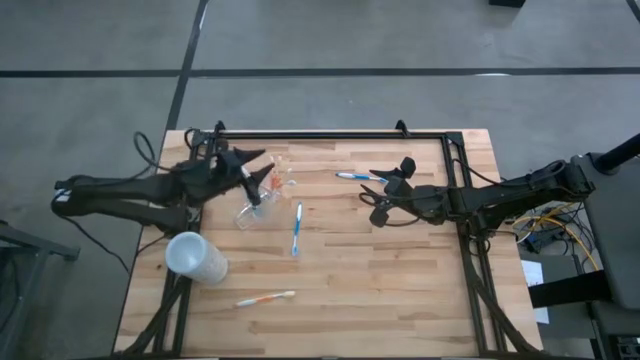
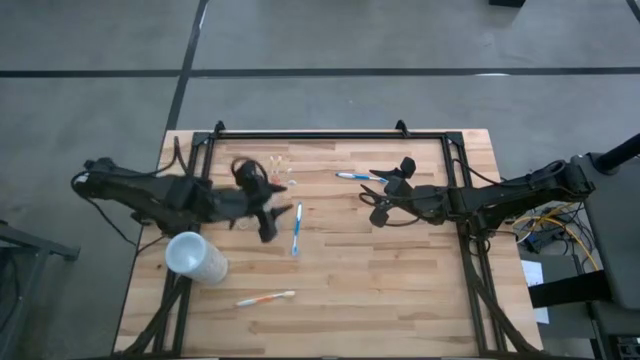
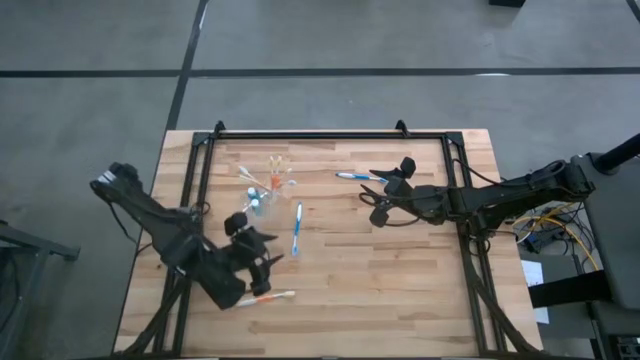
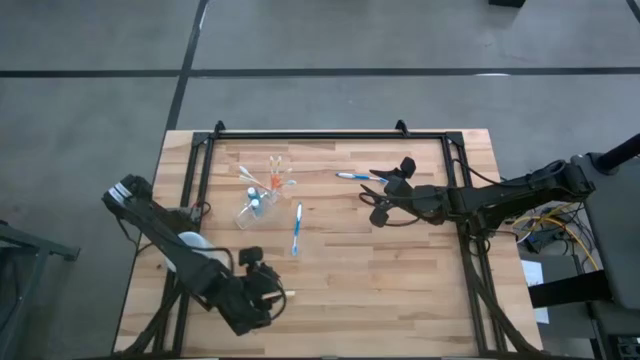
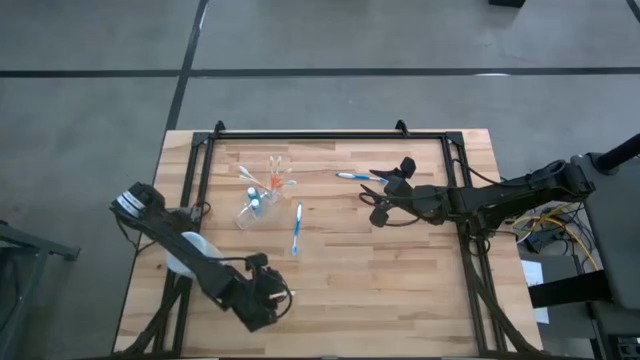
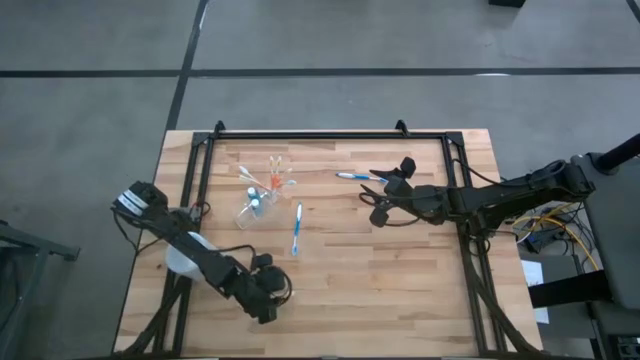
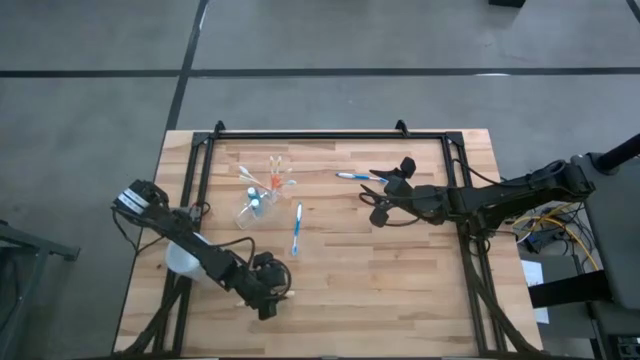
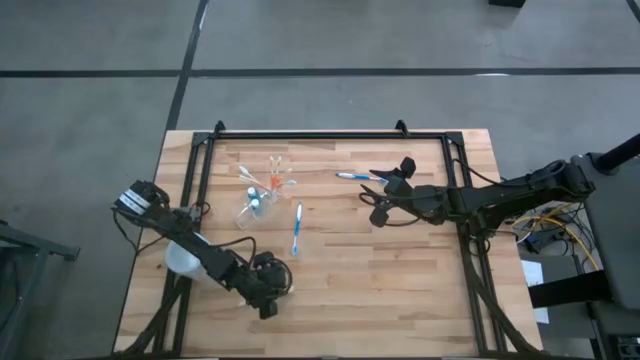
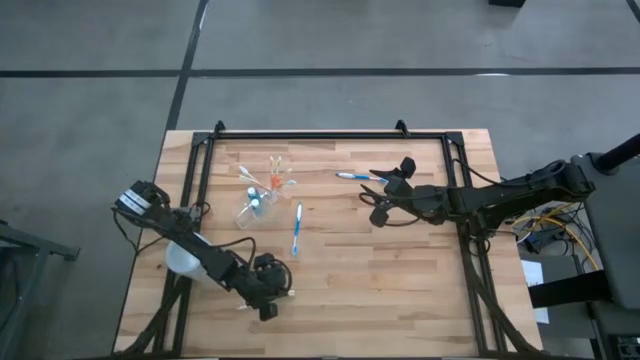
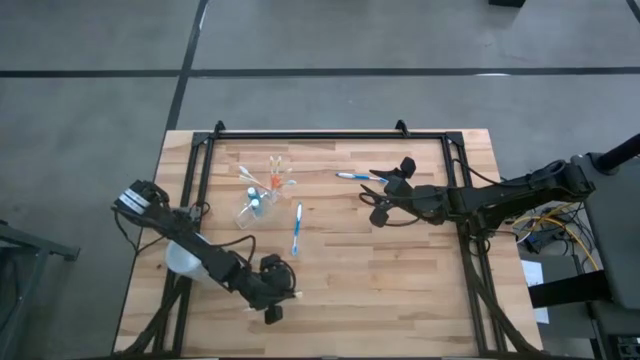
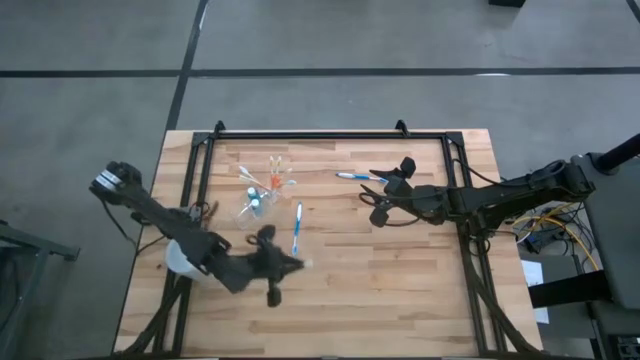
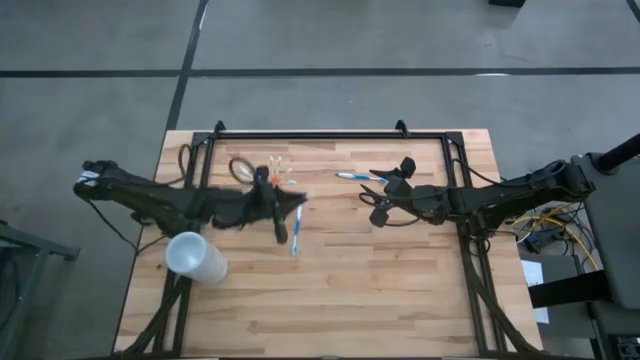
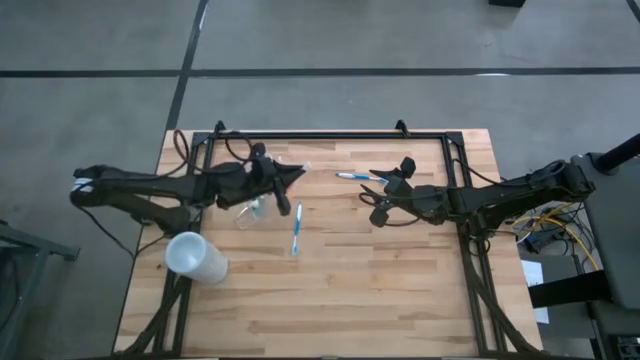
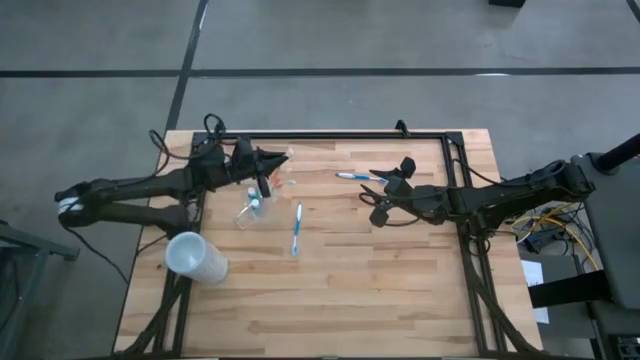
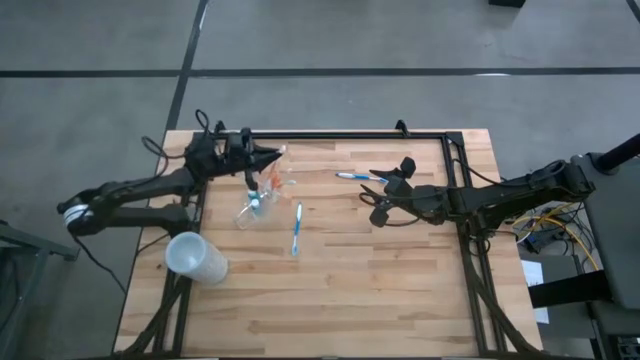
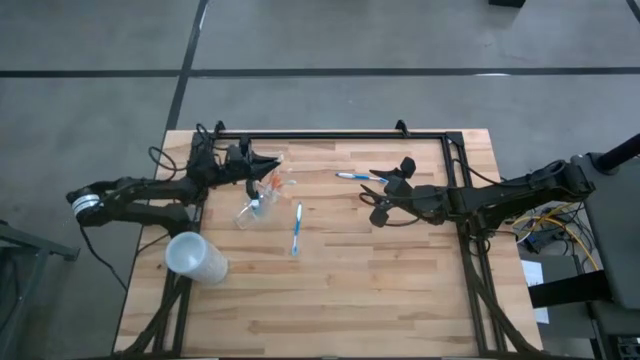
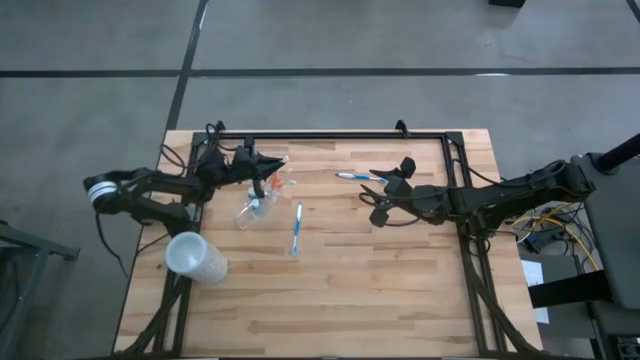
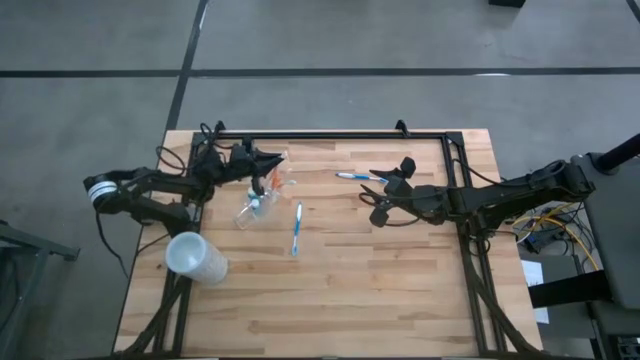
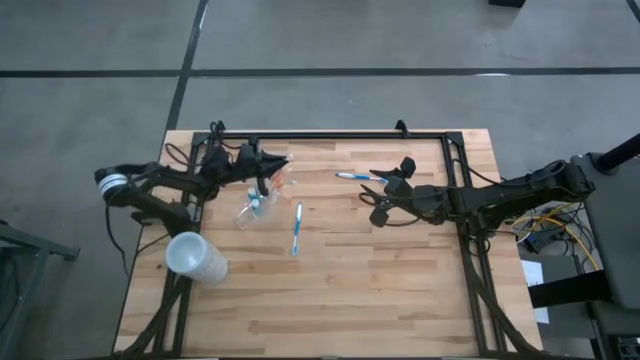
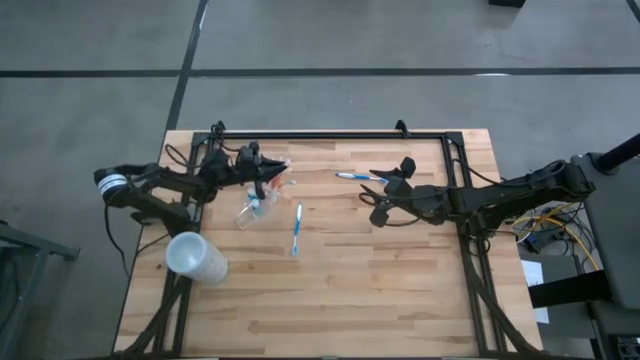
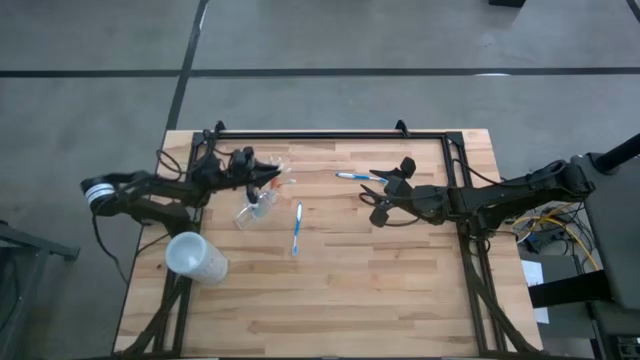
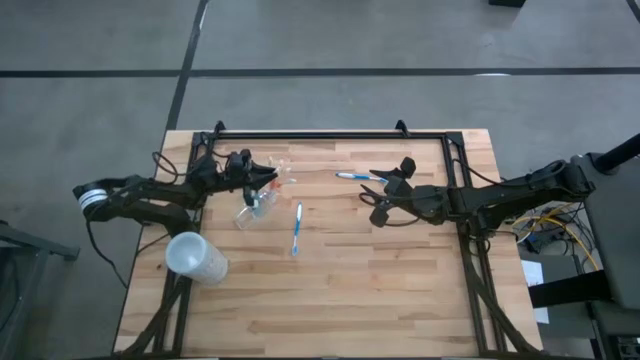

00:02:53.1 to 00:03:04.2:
Task: Pick & Place toothbrushing station
Put the orange toothbrush into the transparent organizer

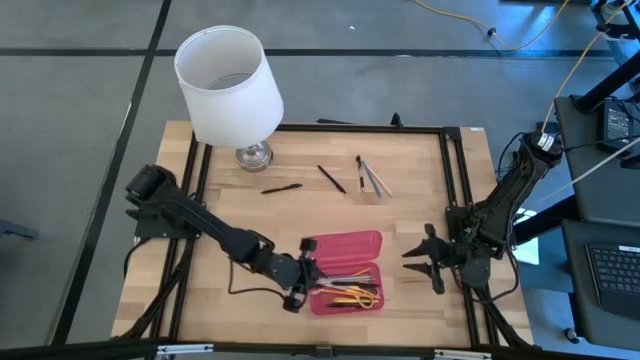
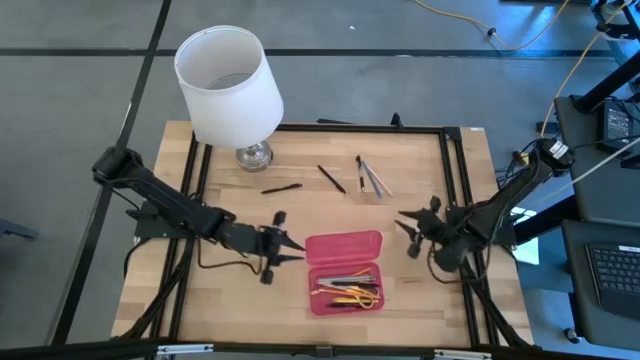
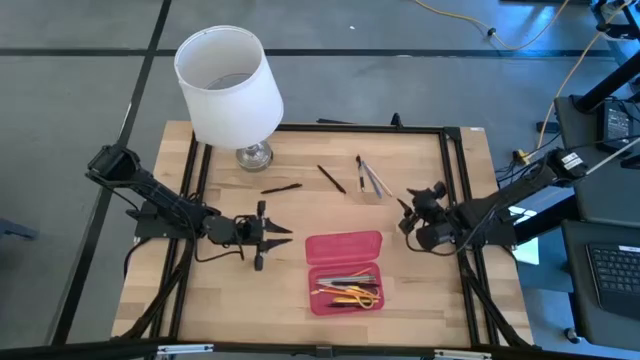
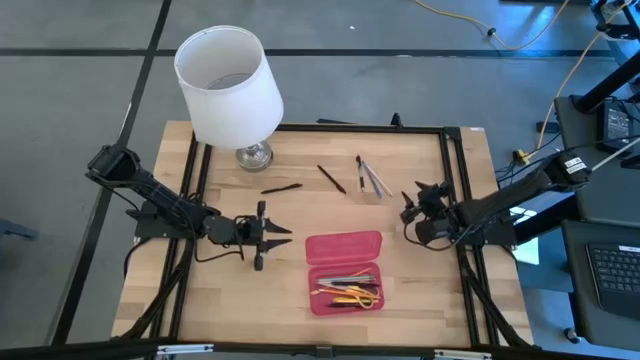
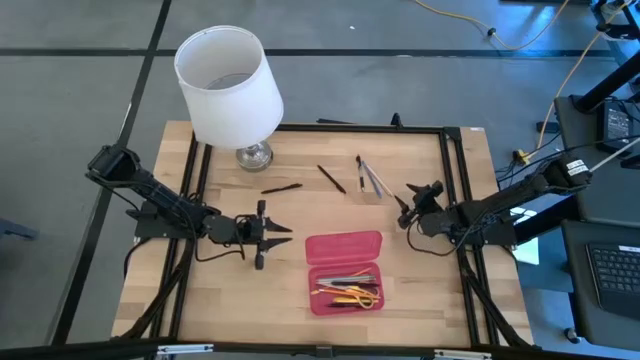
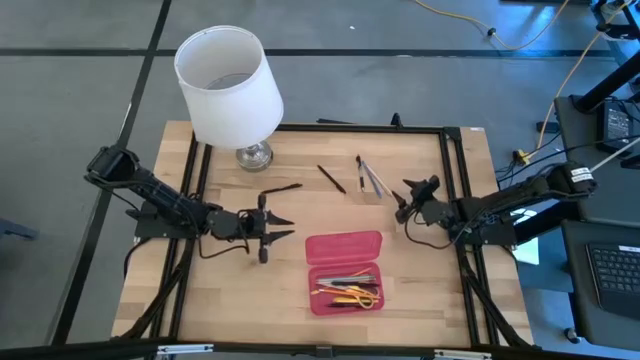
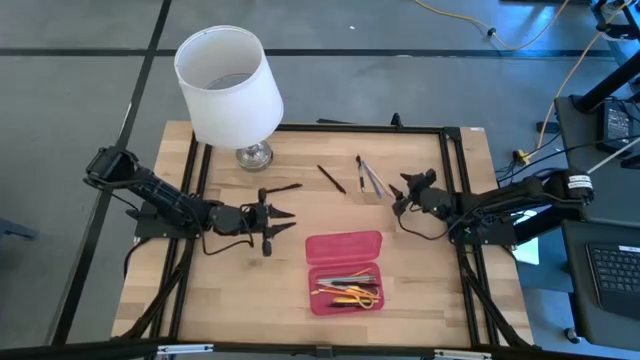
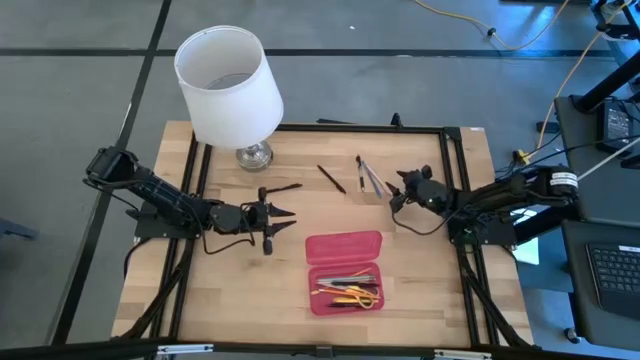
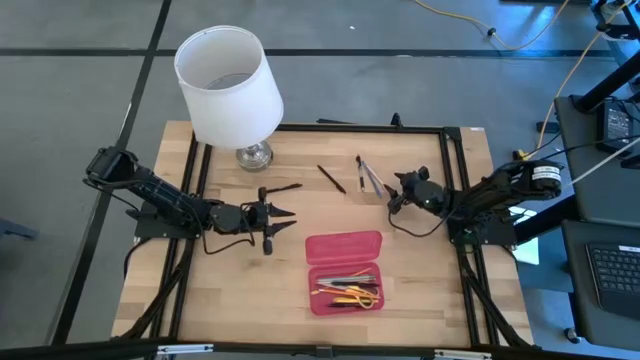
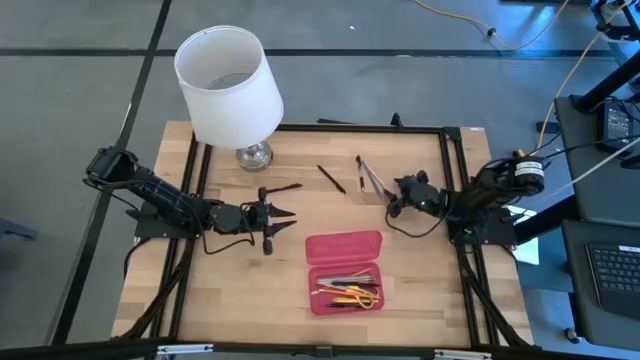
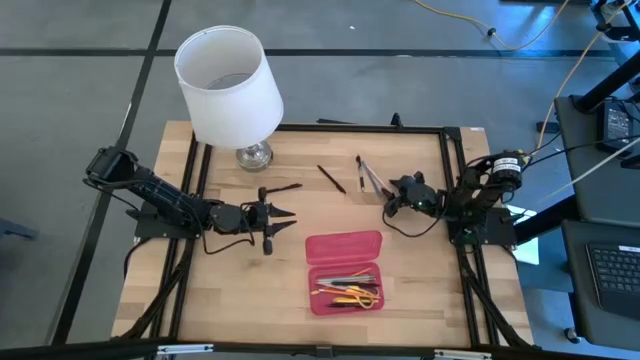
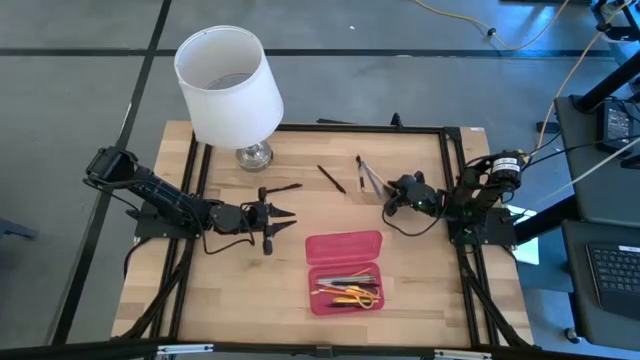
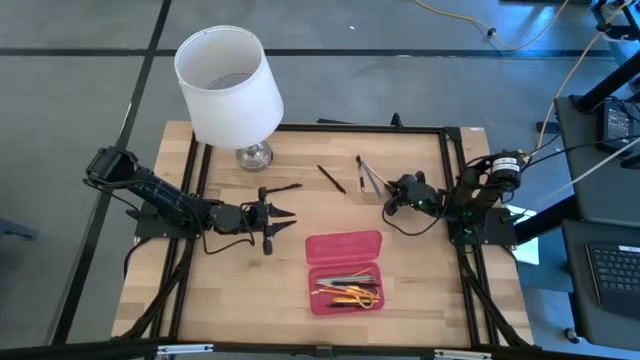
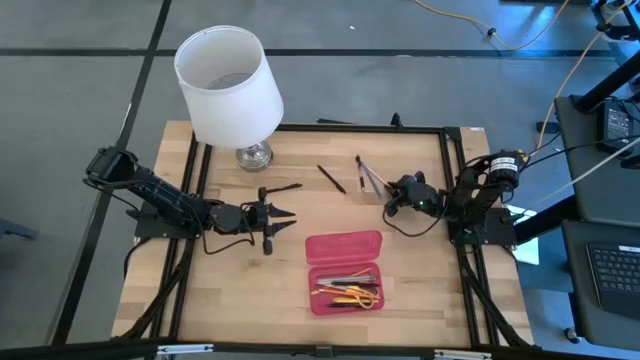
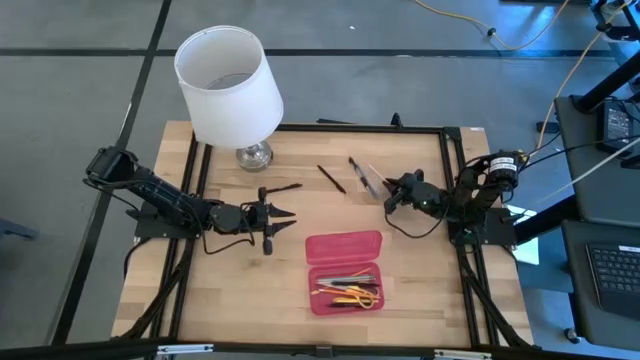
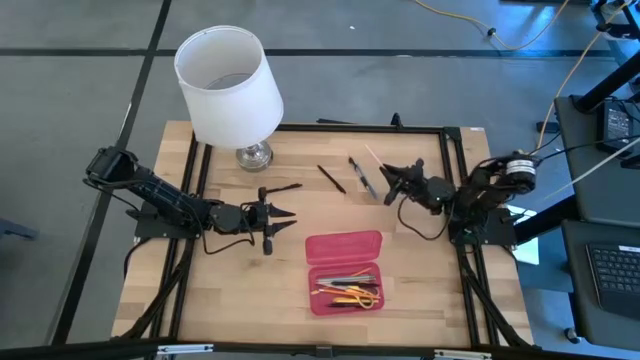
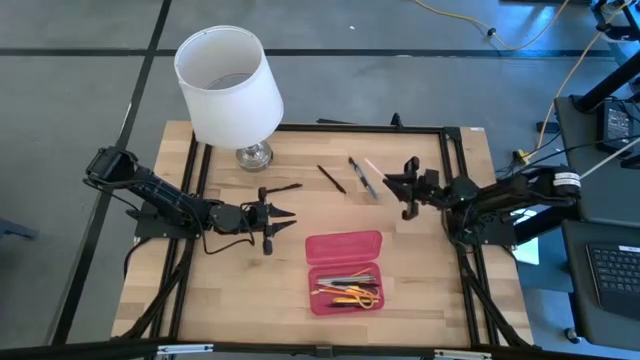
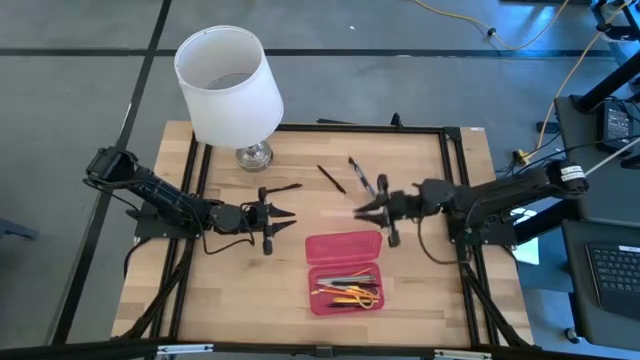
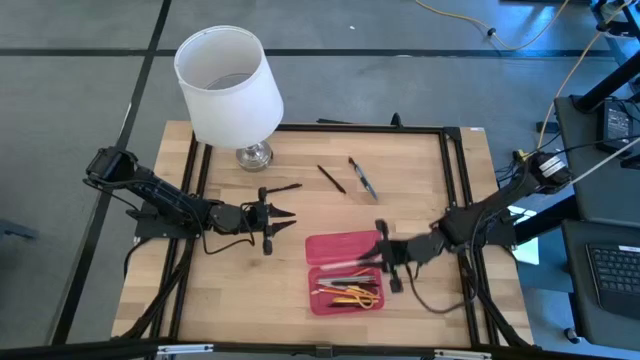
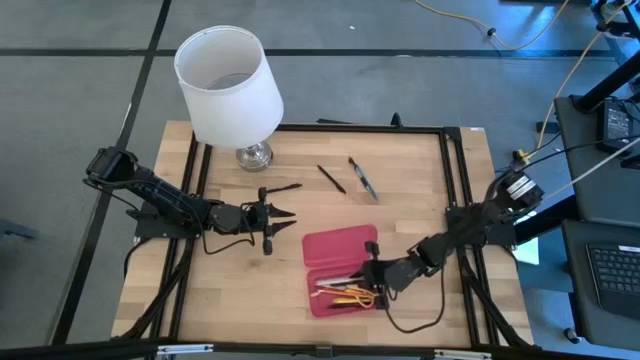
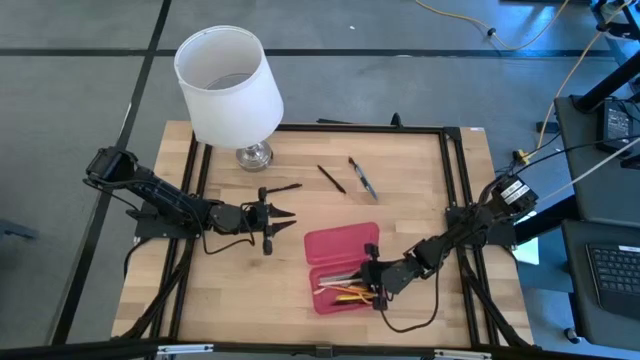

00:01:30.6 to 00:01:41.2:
Task: Pick & place school supplies into a supply box
Put the pink pen into the pink supply box
